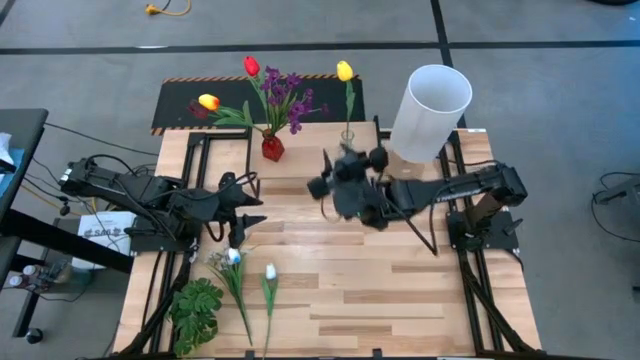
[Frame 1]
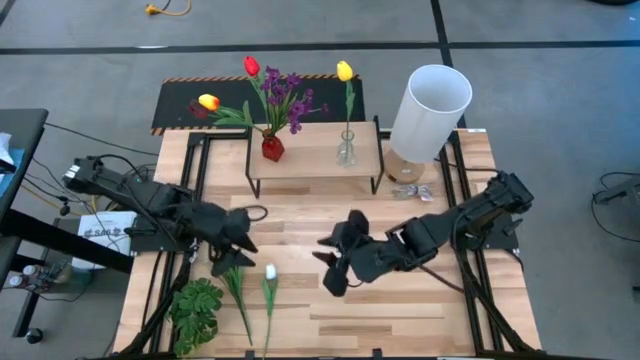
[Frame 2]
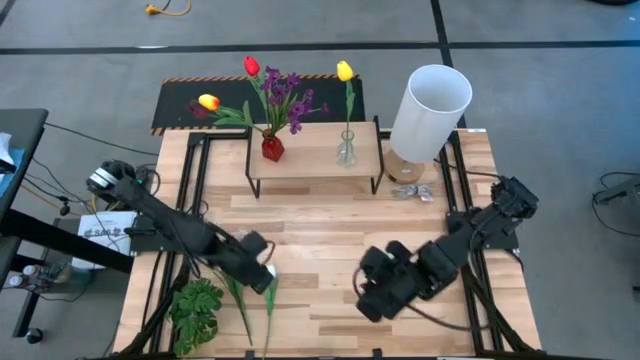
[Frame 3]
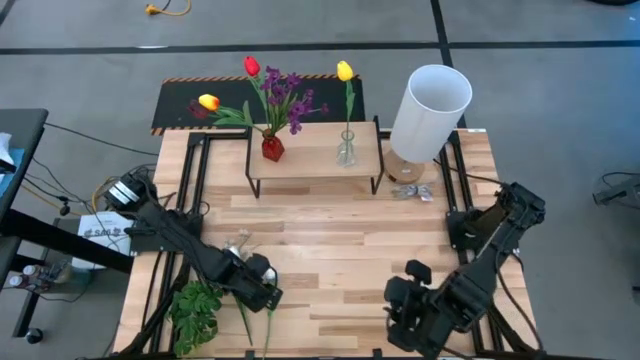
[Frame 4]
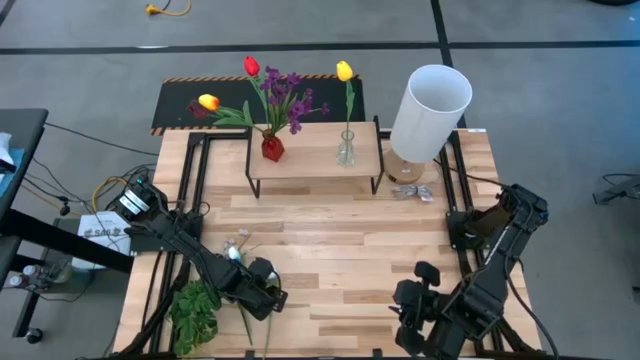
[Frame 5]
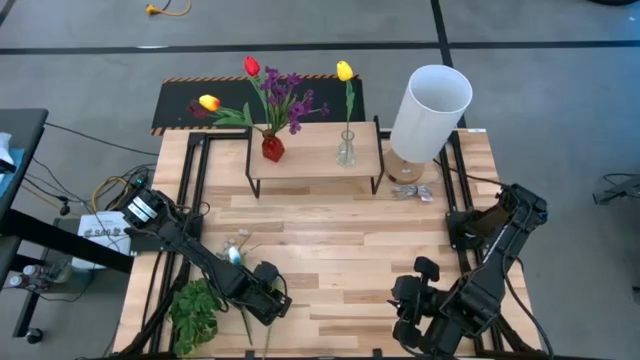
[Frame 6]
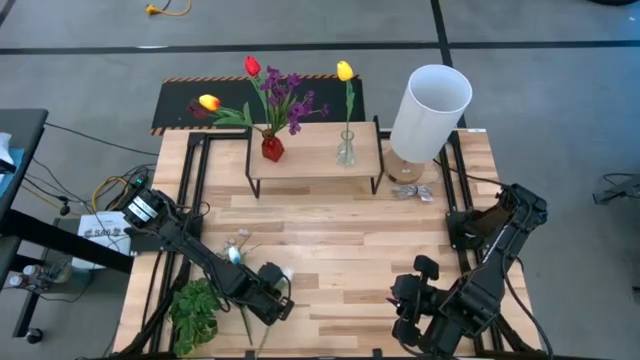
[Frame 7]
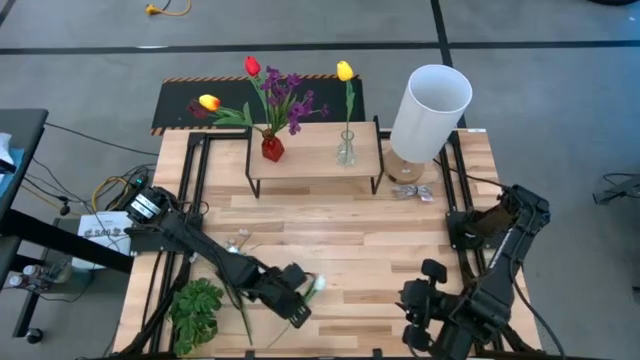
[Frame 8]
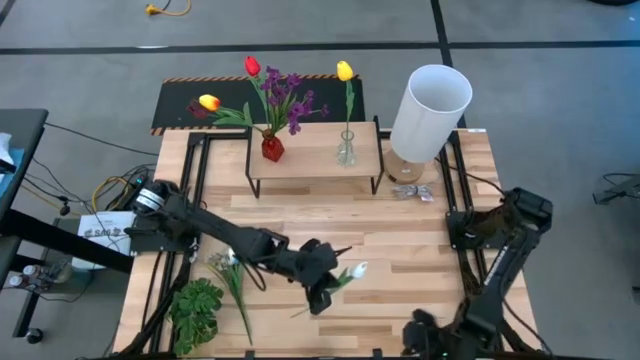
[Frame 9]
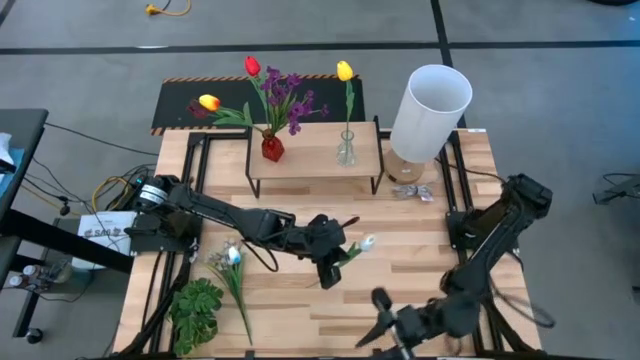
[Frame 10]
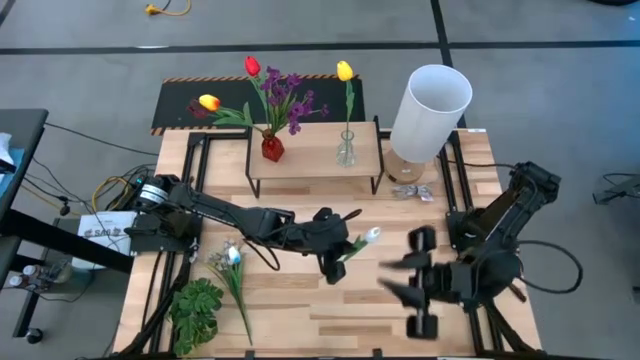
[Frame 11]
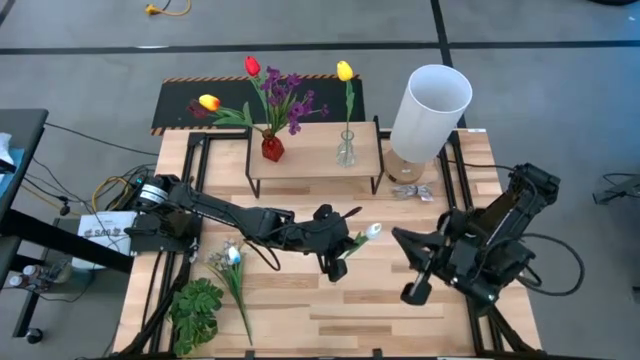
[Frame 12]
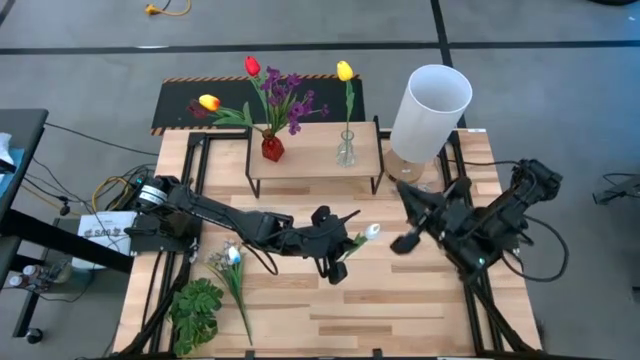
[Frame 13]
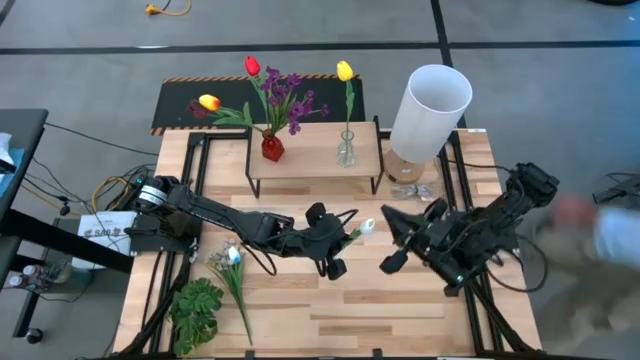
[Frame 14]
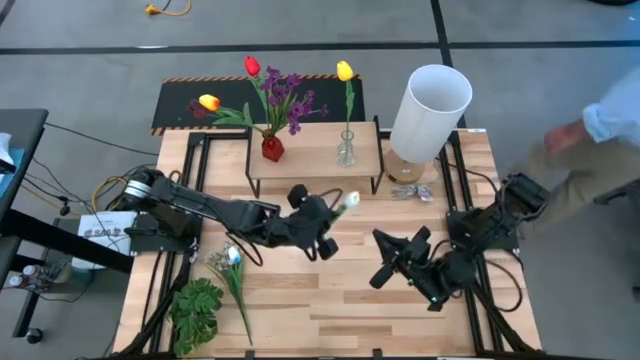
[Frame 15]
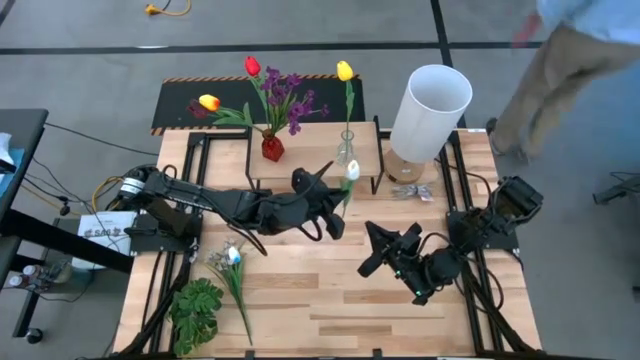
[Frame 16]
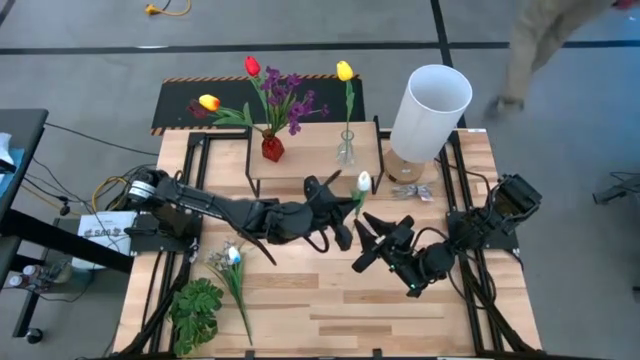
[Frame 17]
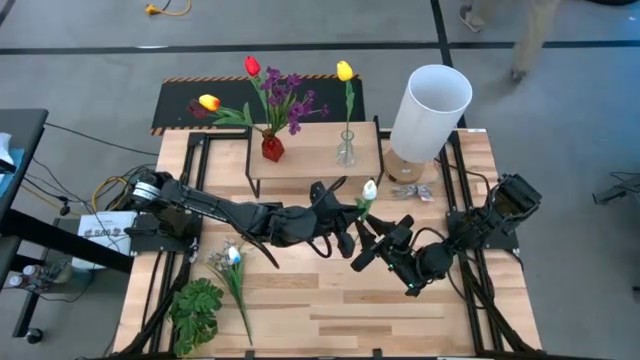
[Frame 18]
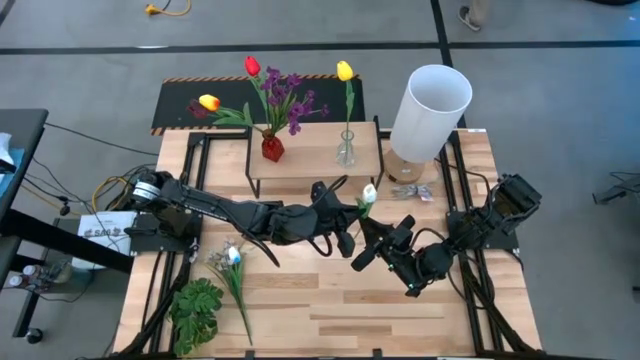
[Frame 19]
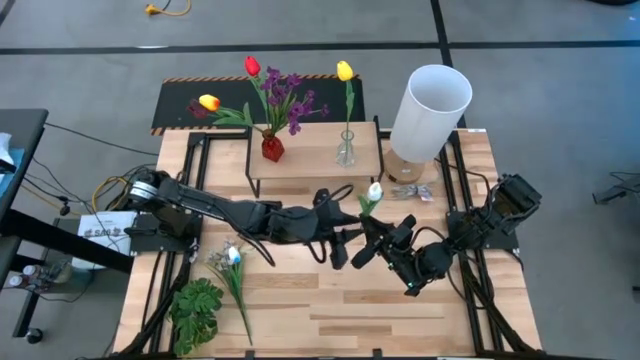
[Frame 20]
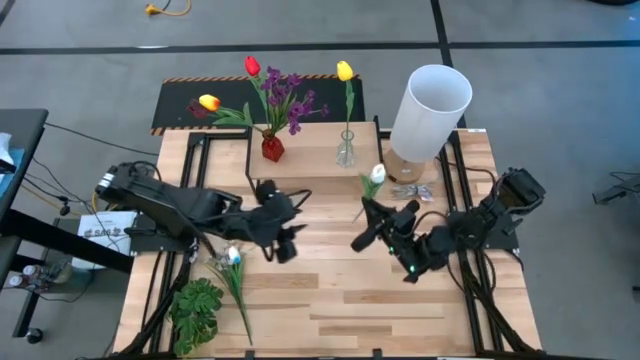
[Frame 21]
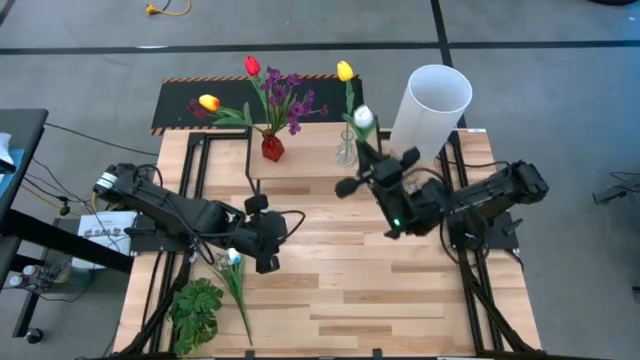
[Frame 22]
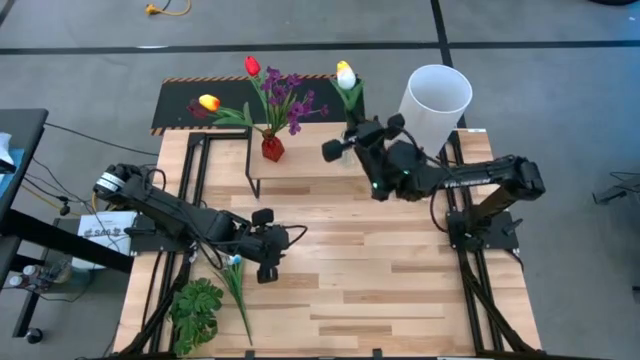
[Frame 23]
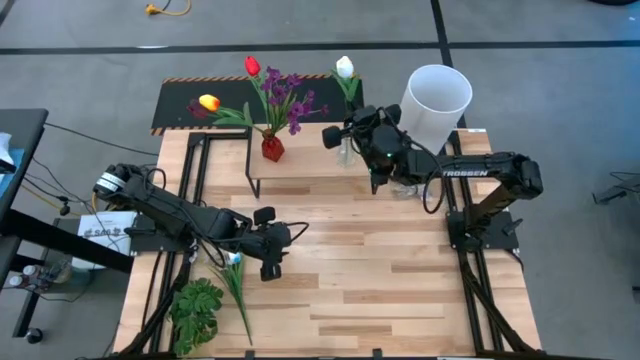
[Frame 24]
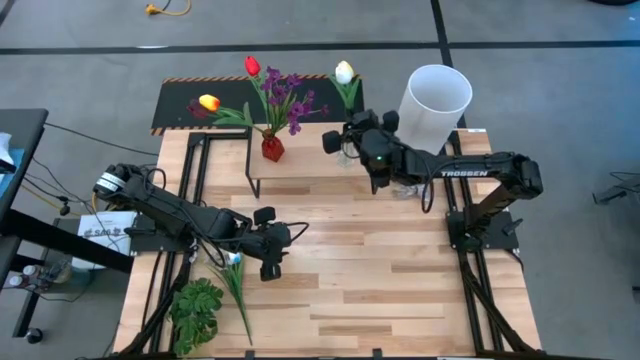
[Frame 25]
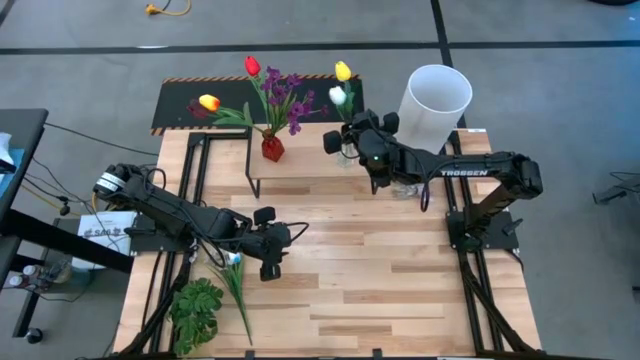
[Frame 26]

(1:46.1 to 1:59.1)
Task: Pick and place flowers into a vace then onto a shelf
Put the right white flower into the transparent vase on the shelf

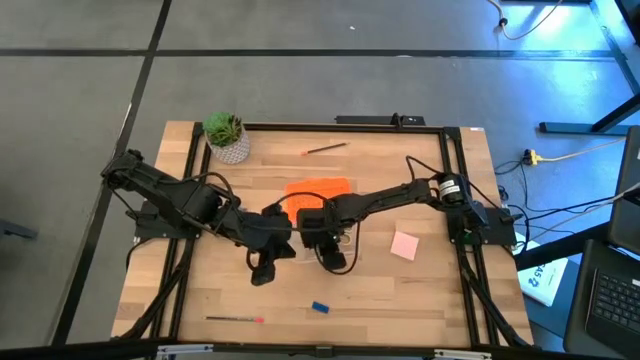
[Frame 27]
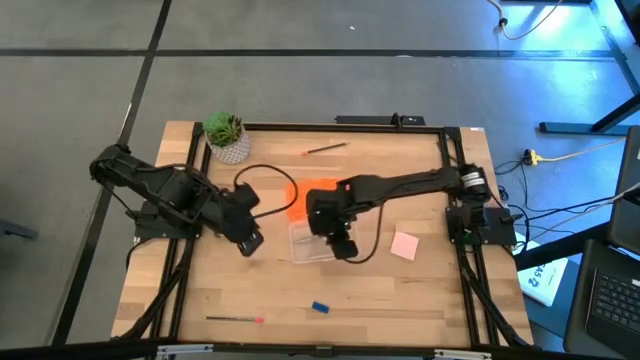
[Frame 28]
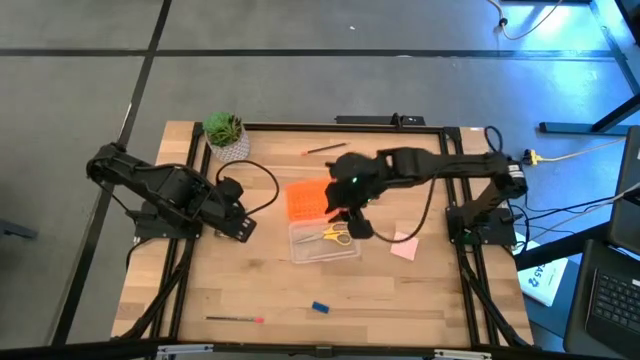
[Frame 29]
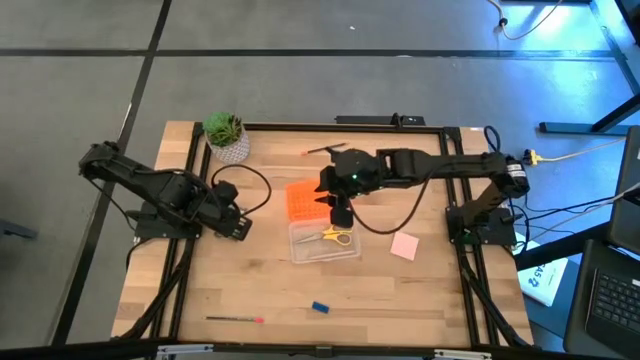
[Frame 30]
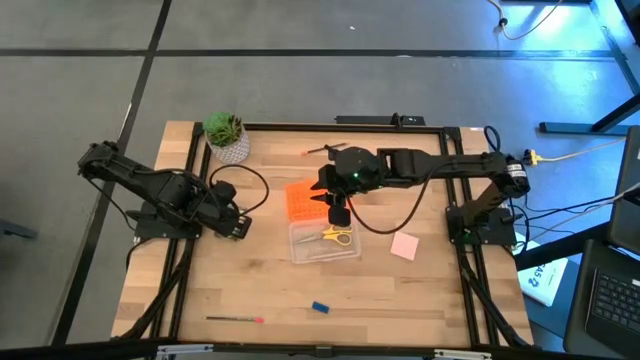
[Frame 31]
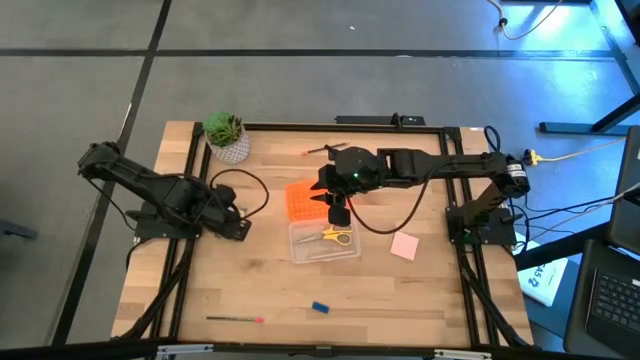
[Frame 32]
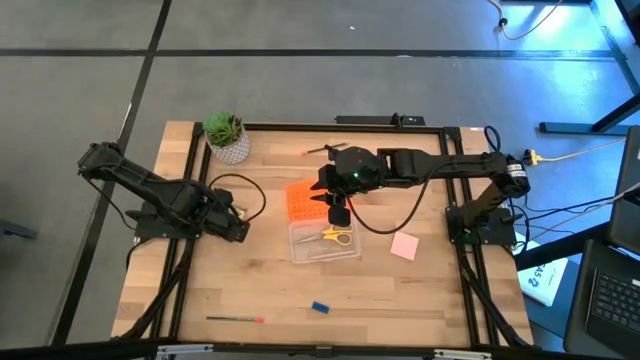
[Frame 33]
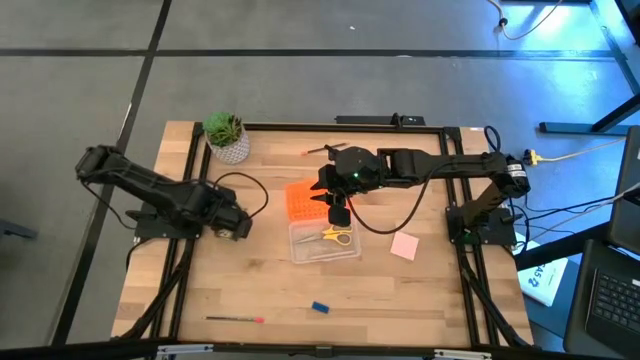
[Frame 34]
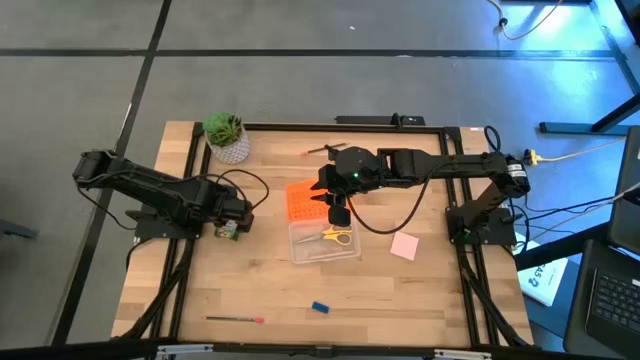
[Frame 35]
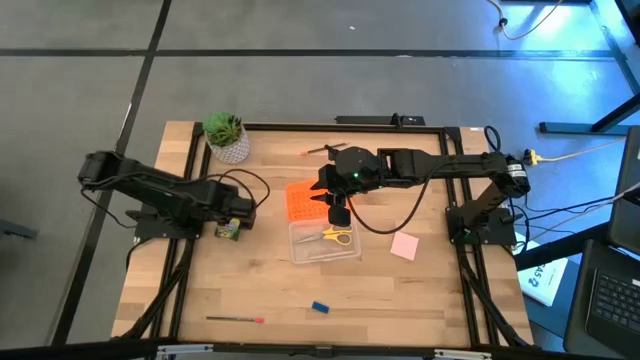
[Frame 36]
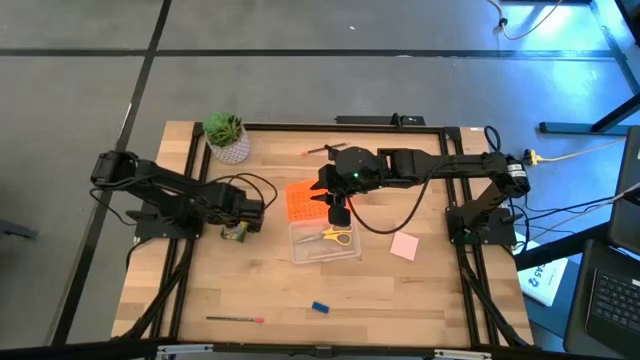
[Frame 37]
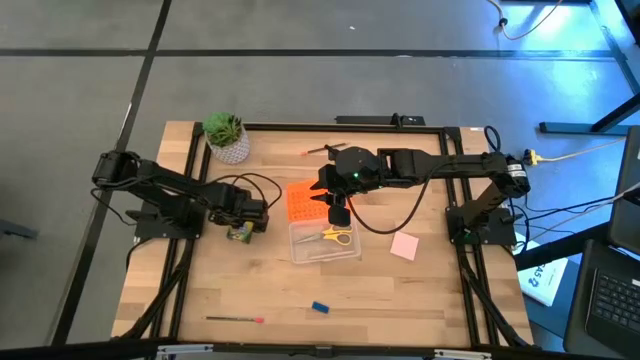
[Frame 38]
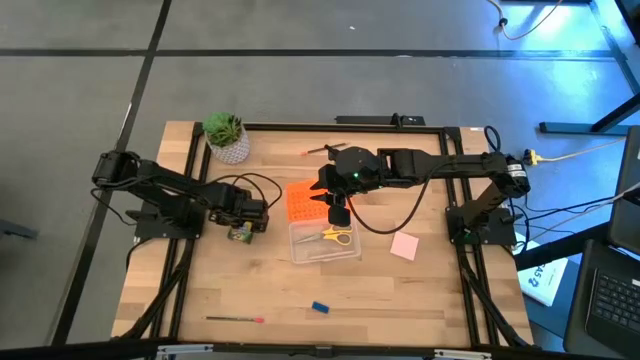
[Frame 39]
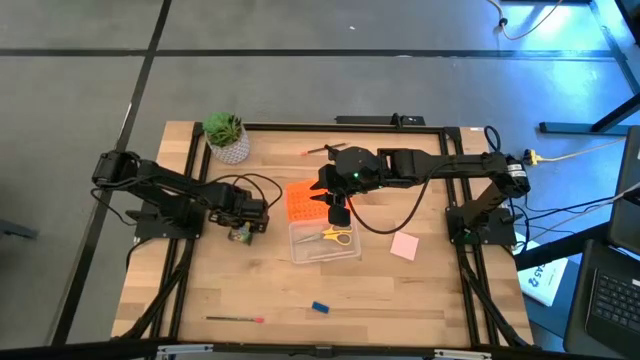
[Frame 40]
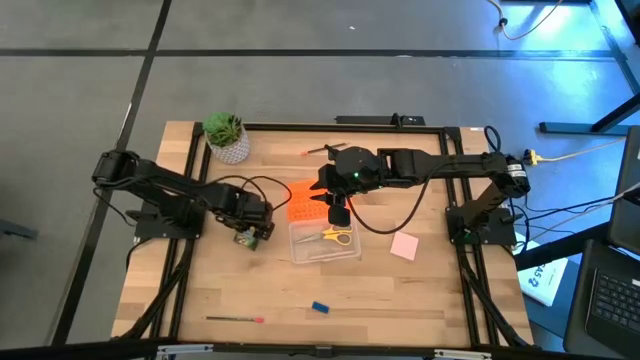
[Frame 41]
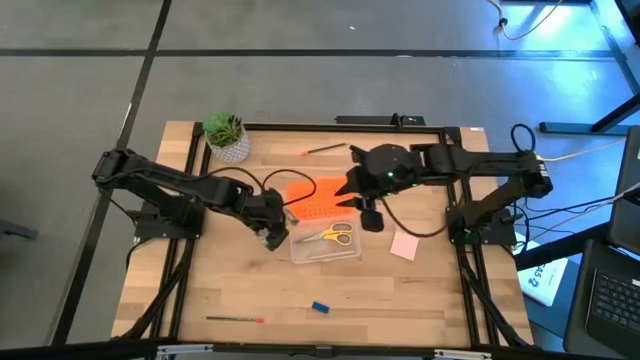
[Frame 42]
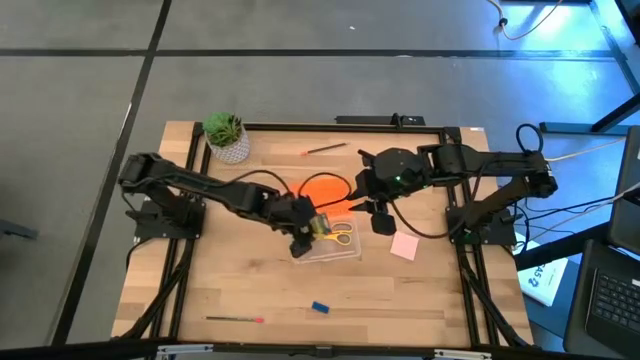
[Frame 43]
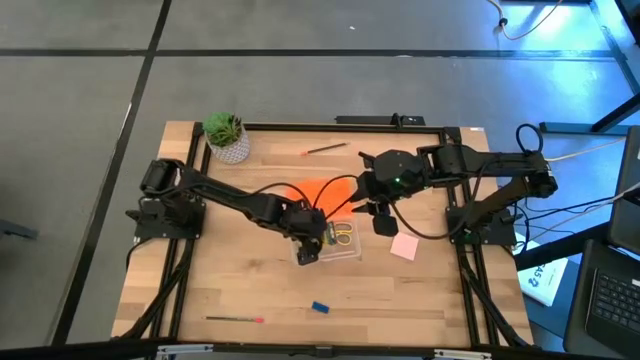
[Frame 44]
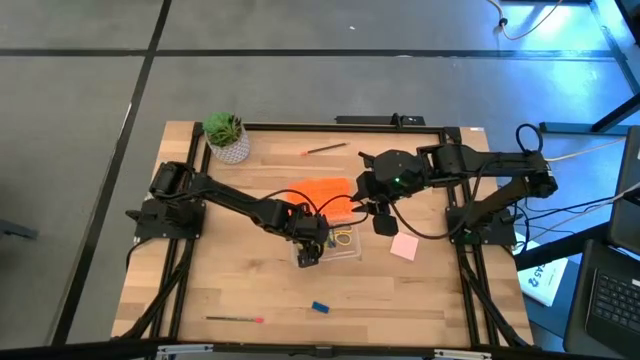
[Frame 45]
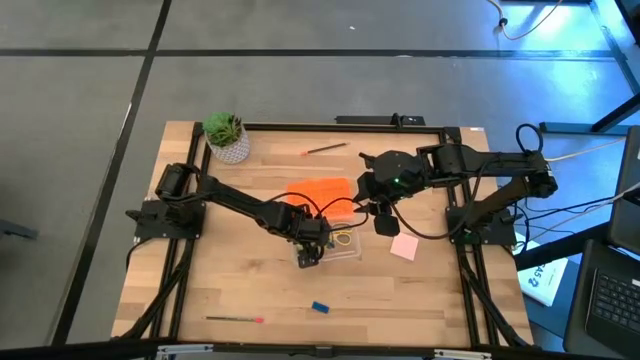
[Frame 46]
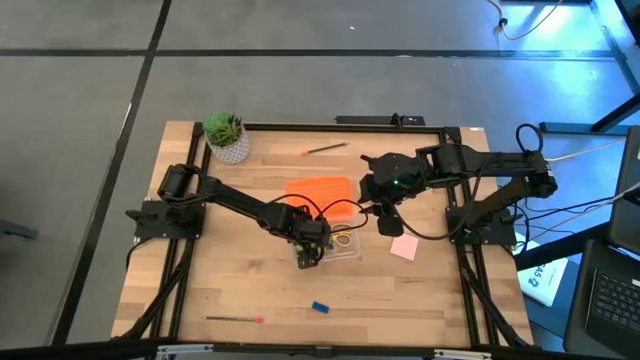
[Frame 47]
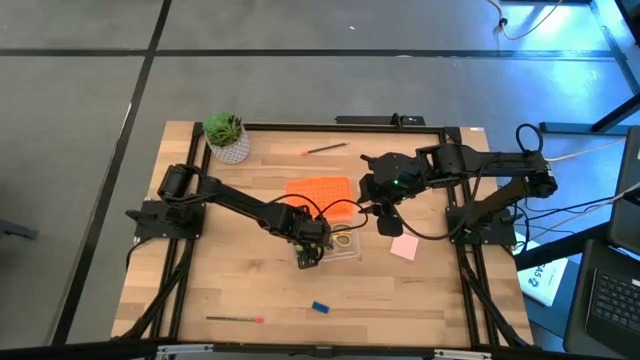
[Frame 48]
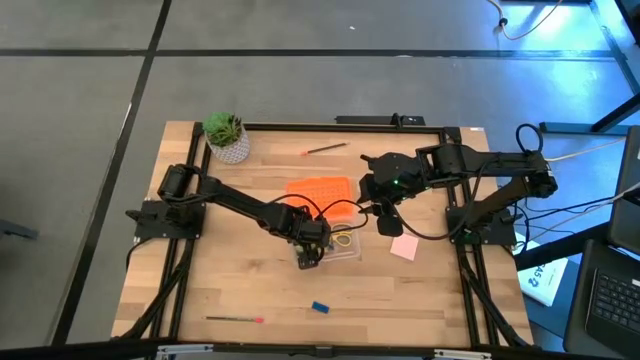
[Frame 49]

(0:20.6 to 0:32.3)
Task: Pack school essentials
Put the crayon box into the supply box
